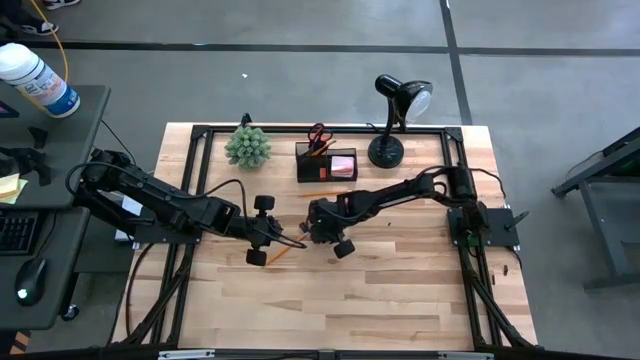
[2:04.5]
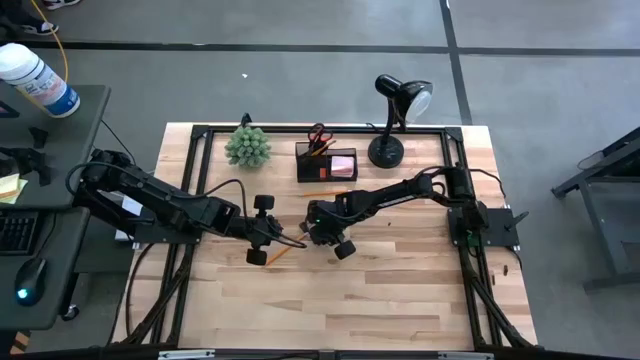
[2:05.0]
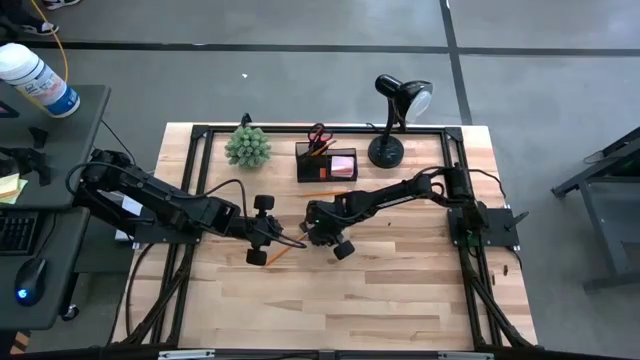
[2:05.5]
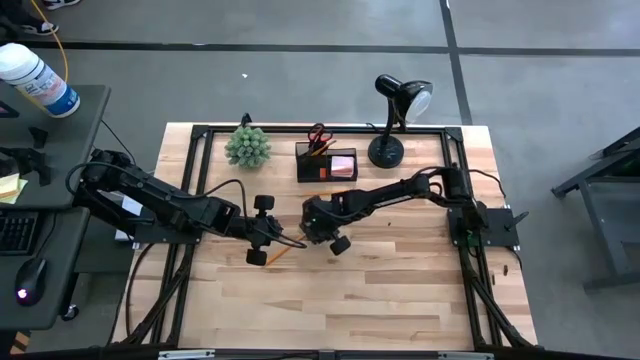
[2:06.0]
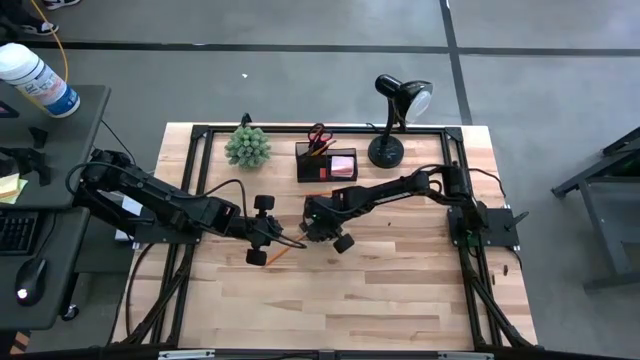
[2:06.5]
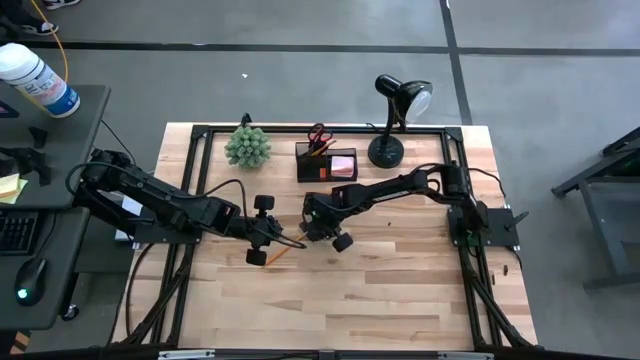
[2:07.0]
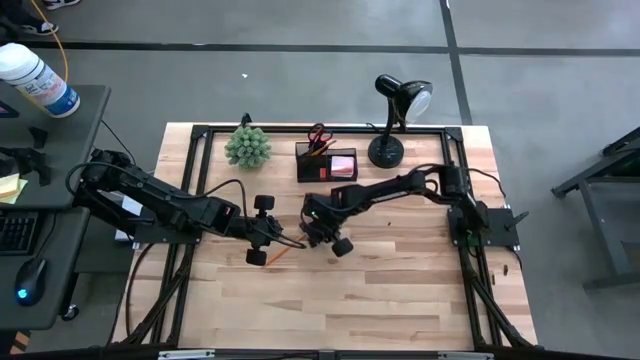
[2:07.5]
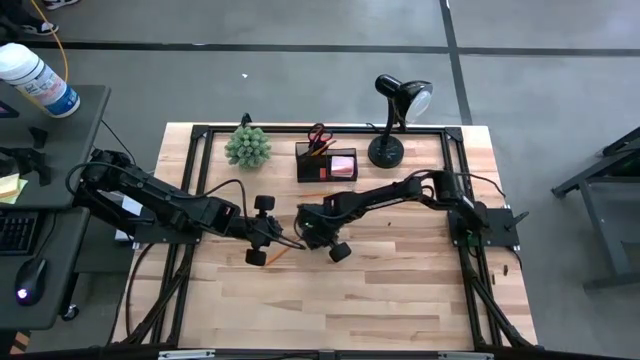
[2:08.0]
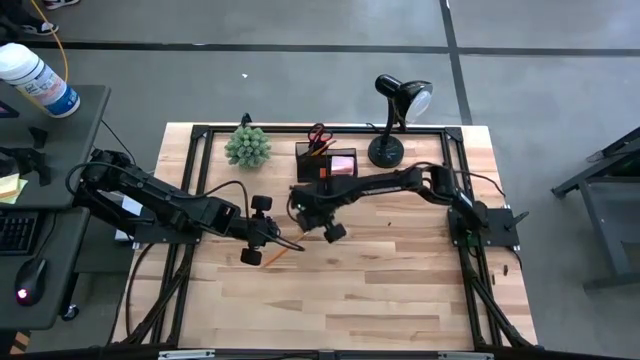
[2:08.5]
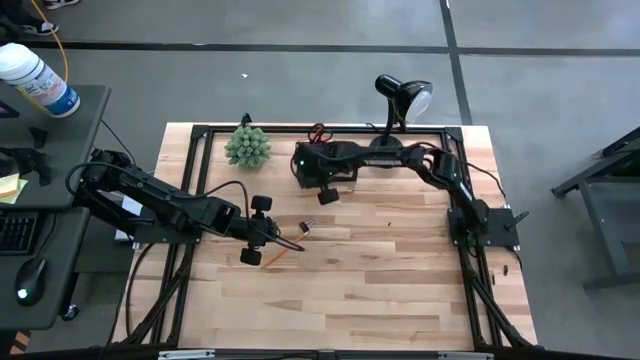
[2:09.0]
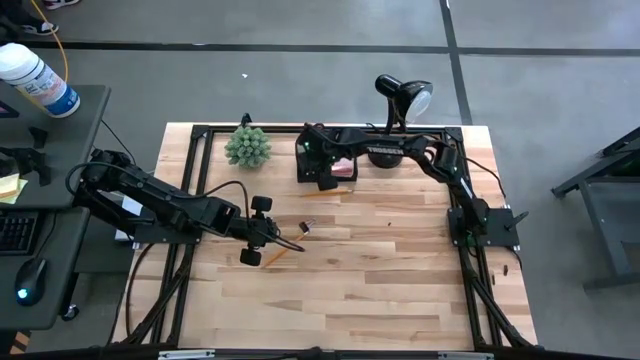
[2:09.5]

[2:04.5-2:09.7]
Task: Pick and place office supplies into organizer
Put the right black binder clip into the black desk organizer

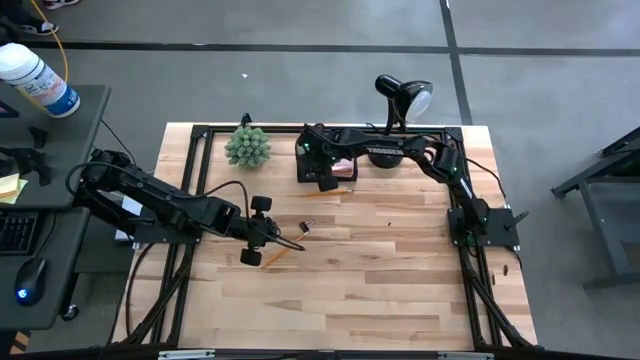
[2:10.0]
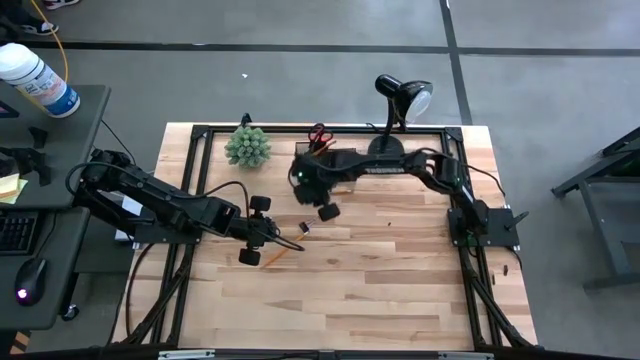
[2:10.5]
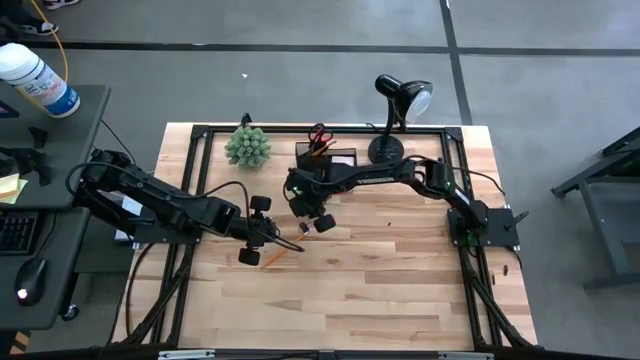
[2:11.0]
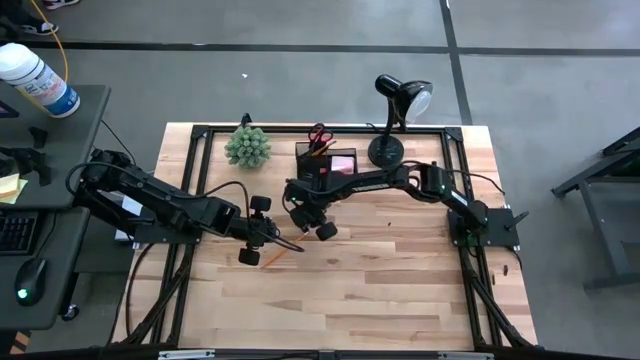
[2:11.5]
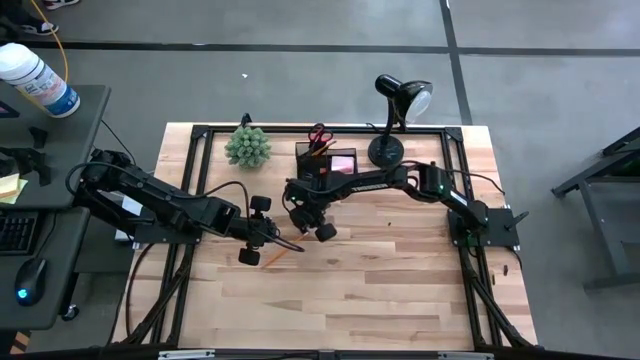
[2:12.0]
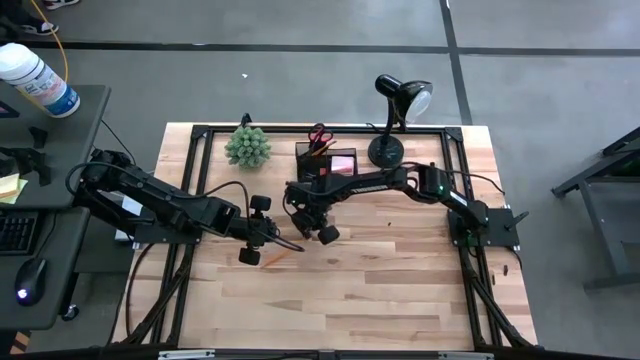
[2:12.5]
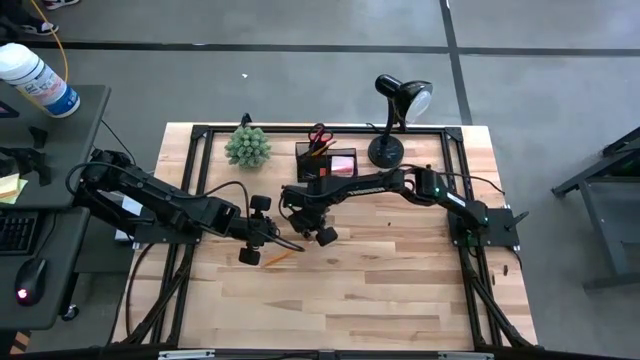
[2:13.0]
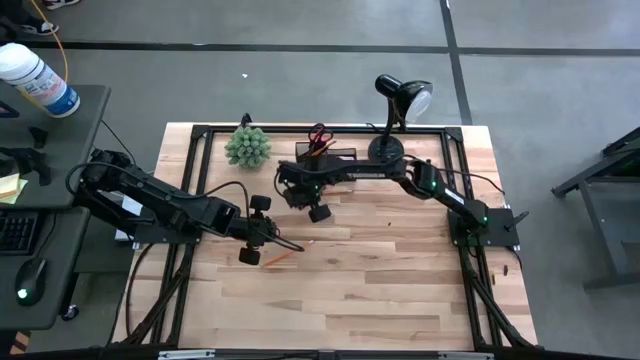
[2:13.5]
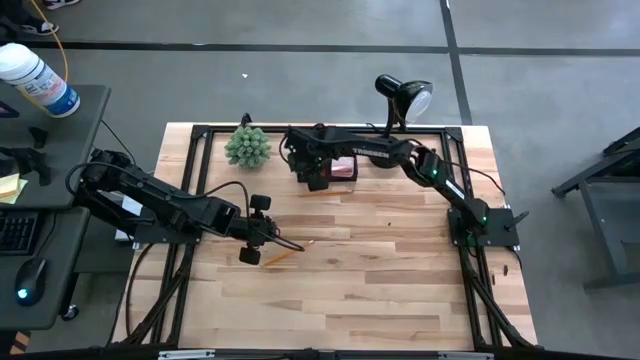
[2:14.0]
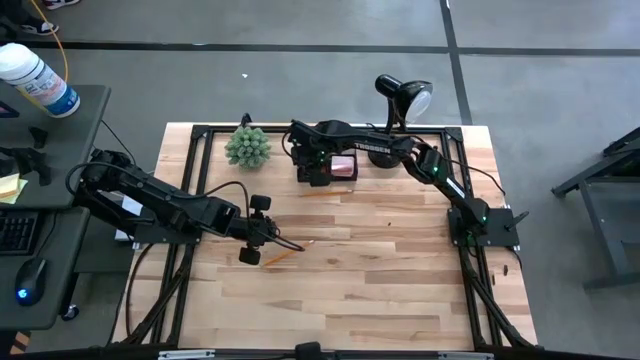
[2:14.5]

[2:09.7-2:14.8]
Put the black binder clip into the black desk organizer

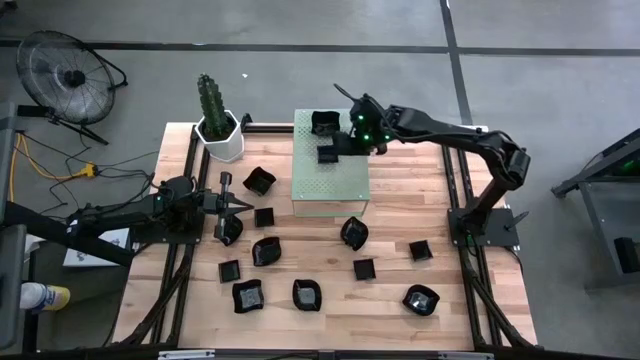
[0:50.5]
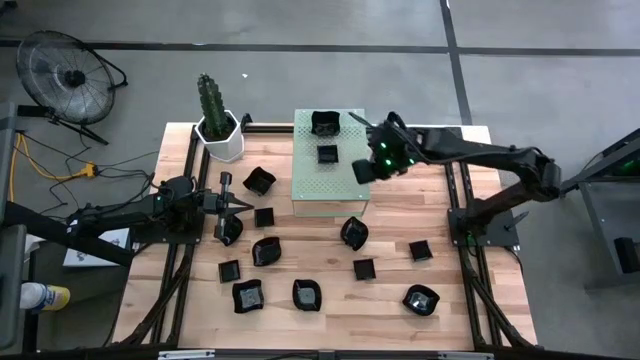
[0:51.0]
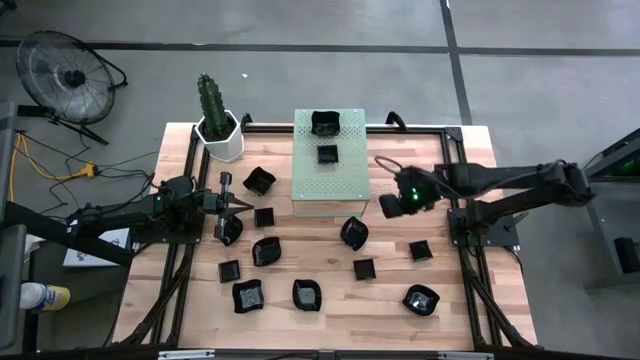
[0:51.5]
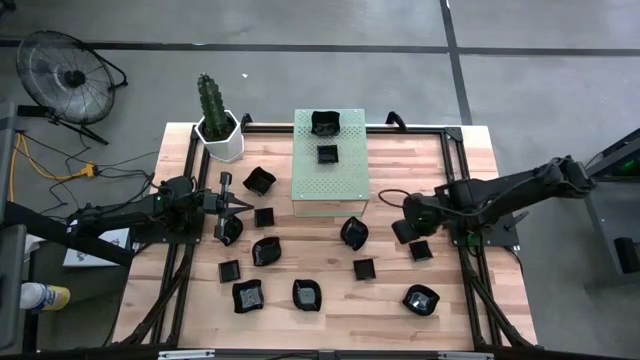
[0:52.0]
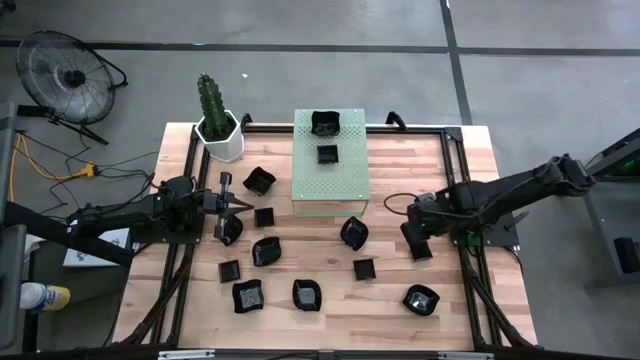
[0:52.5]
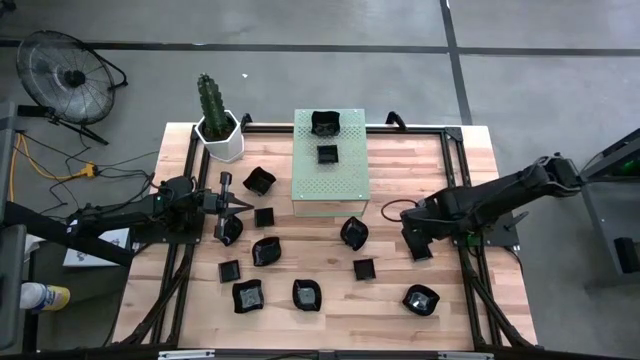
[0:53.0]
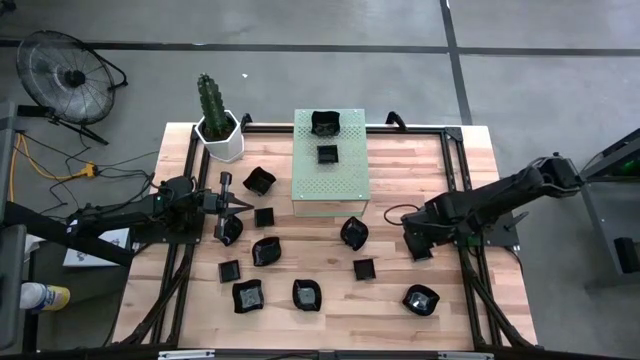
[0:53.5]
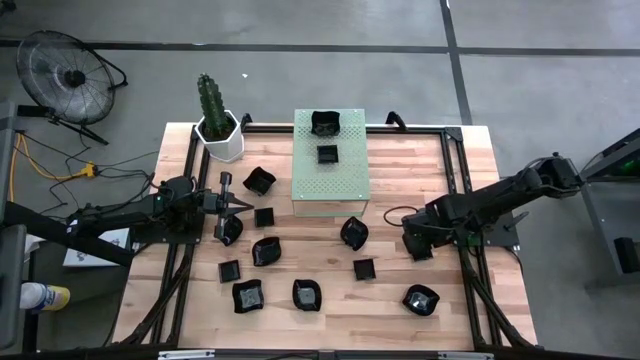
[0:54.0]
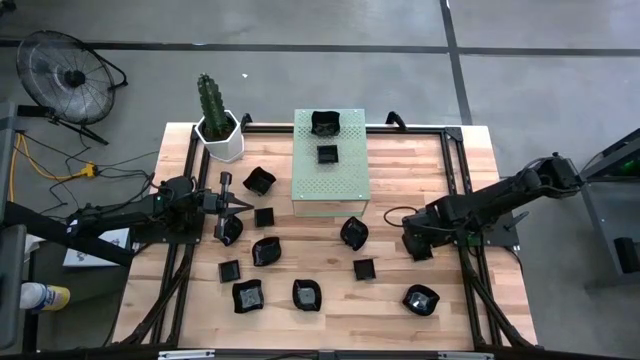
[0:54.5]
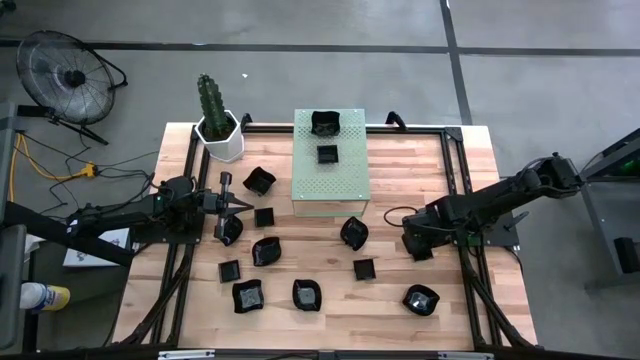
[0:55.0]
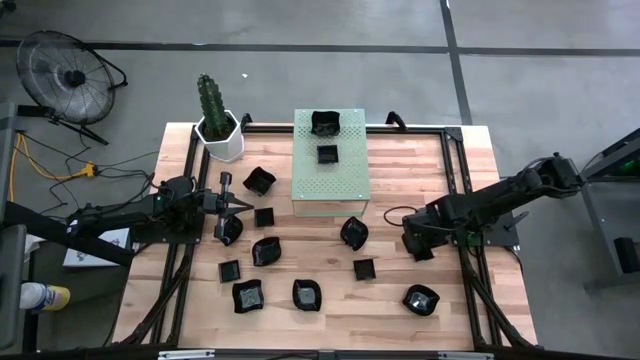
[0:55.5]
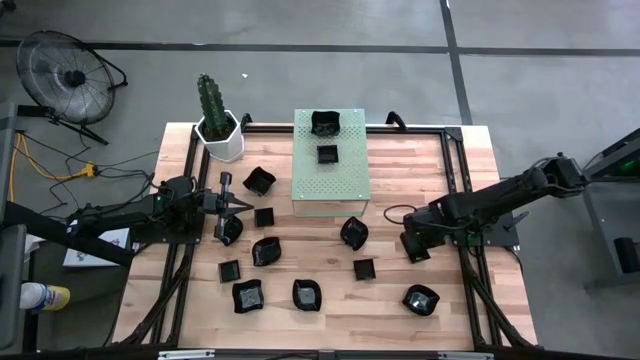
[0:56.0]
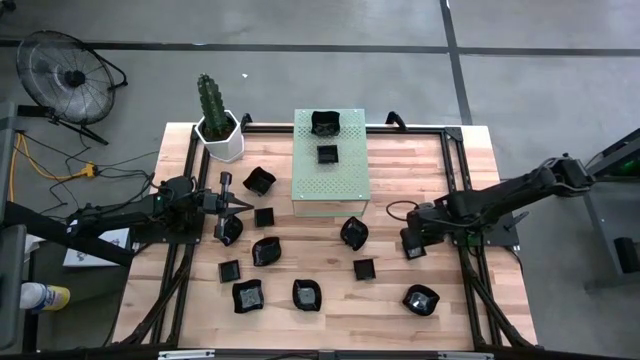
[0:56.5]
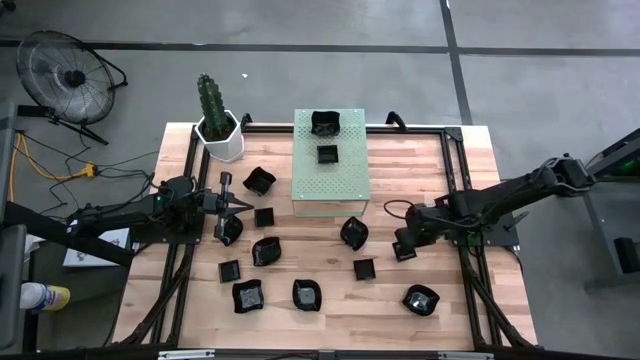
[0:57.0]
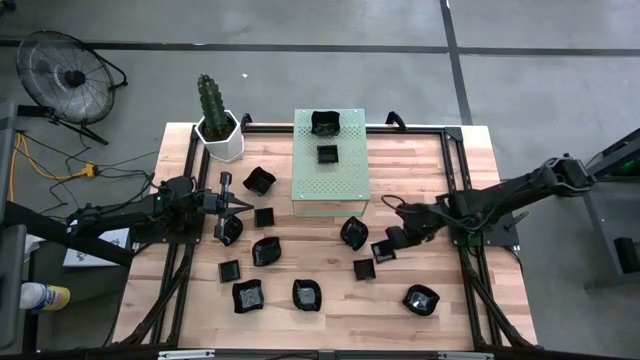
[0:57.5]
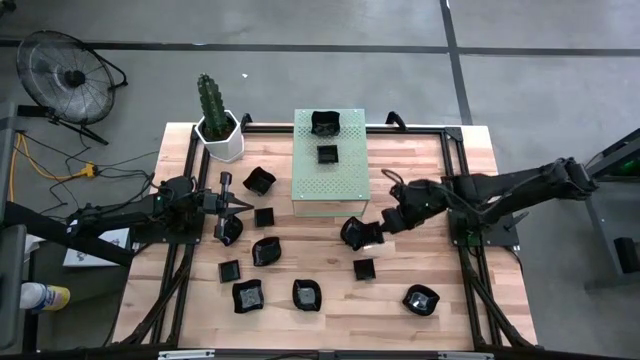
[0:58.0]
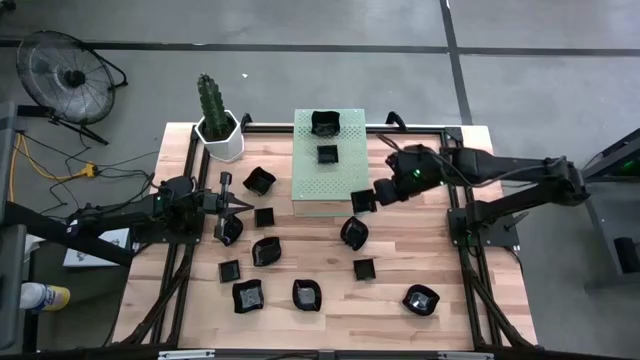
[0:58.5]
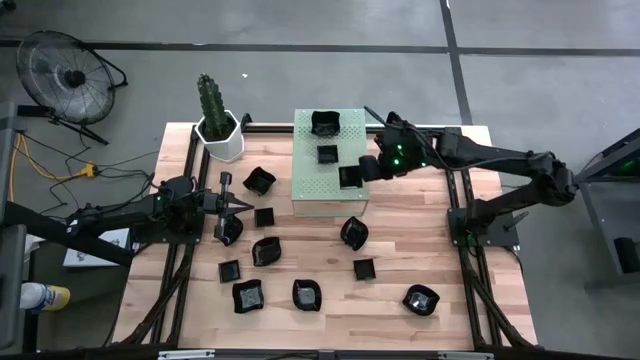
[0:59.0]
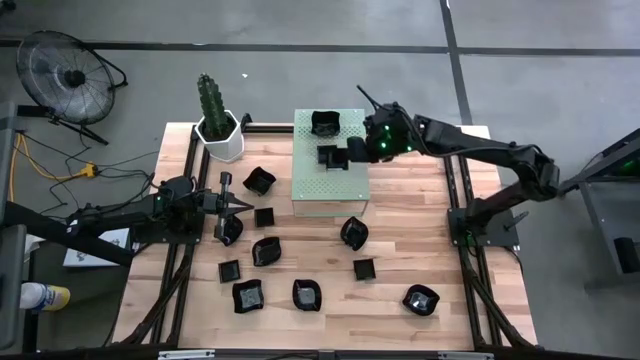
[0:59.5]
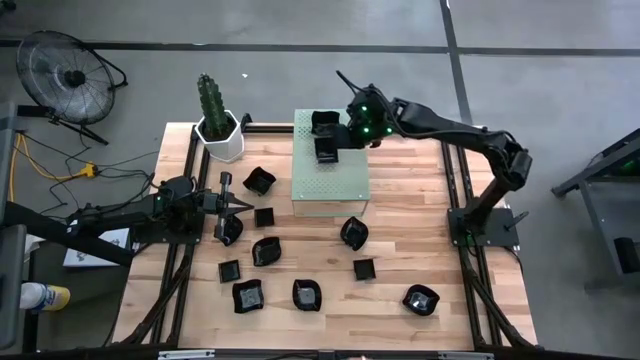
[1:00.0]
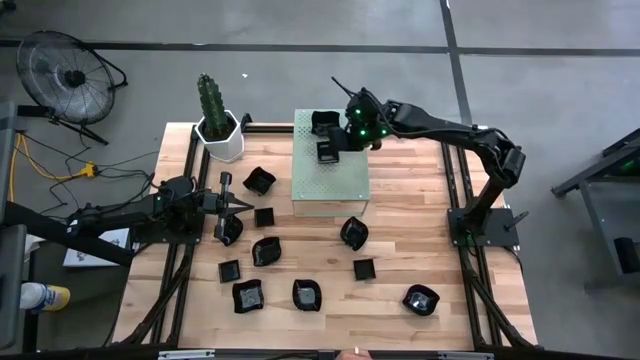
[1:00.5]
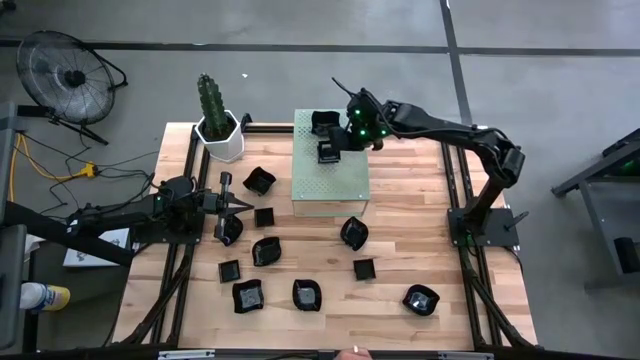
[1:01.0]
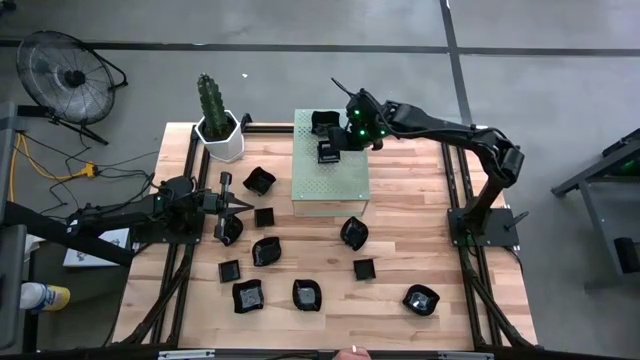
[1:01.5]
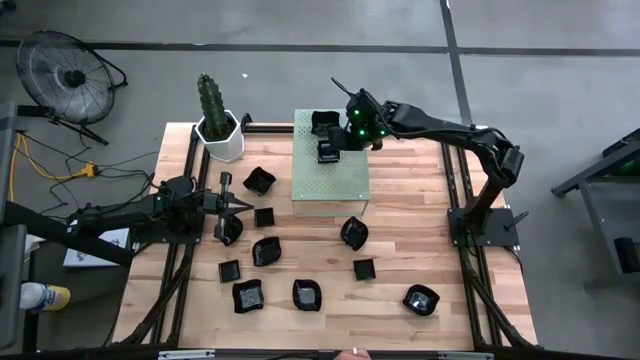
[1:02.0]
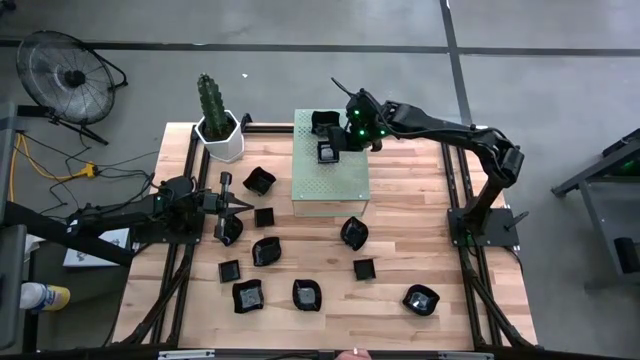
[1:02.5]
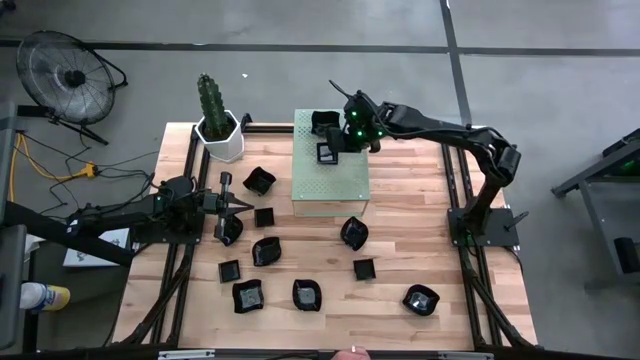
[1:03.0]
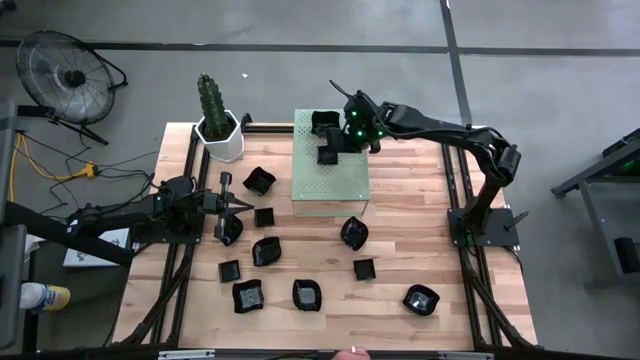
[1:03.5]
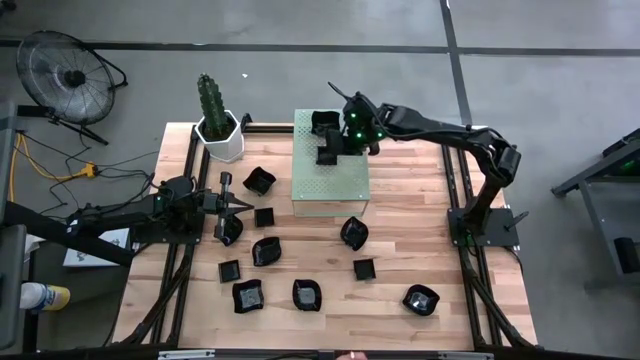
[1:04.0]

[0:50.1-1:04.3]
Task: Pick & Place Mini shaped plates
Stack the black square plate on top of the black square plate on the shelf
